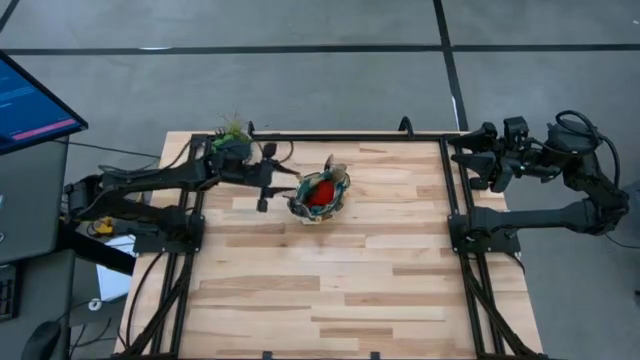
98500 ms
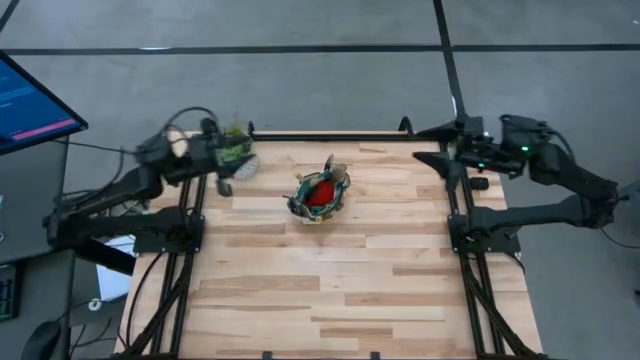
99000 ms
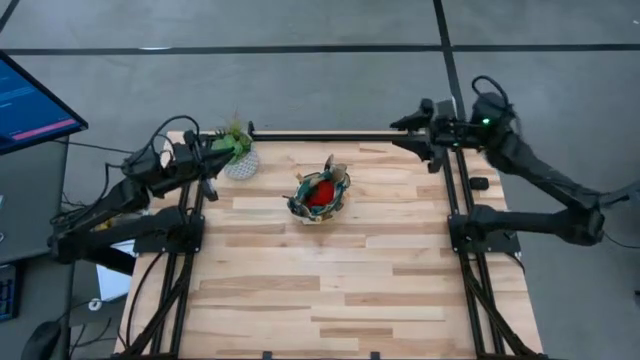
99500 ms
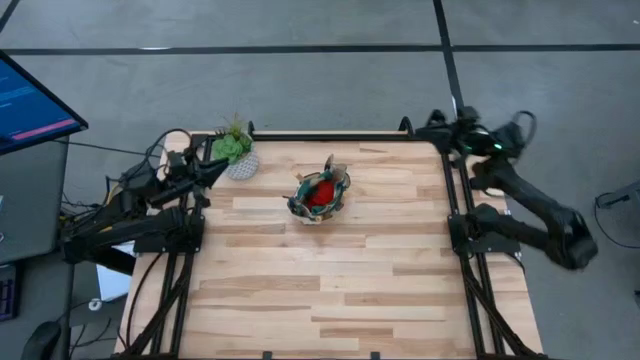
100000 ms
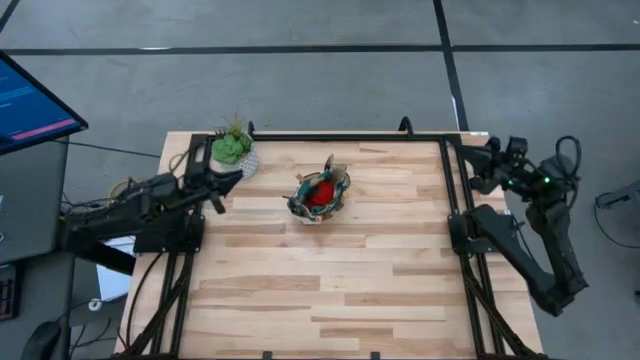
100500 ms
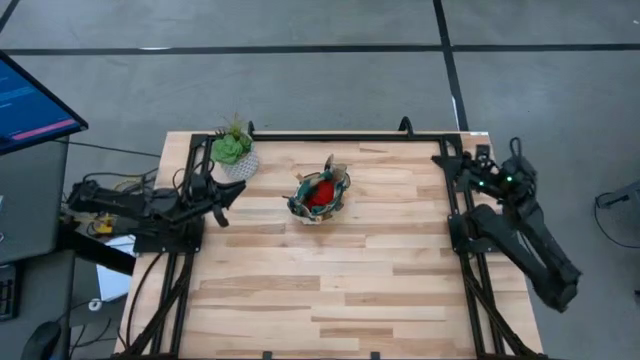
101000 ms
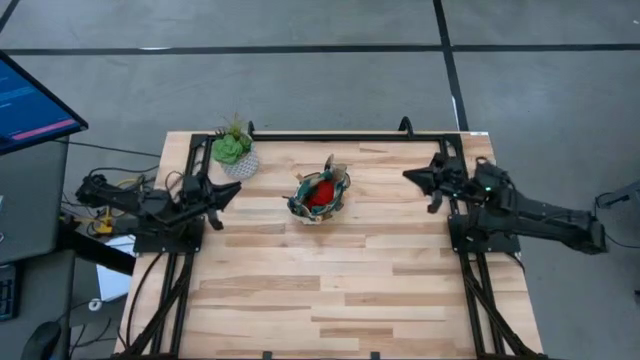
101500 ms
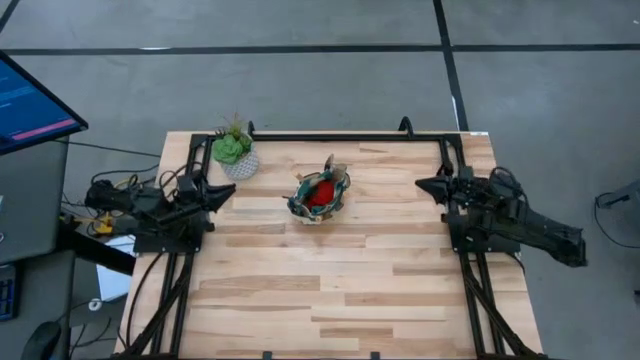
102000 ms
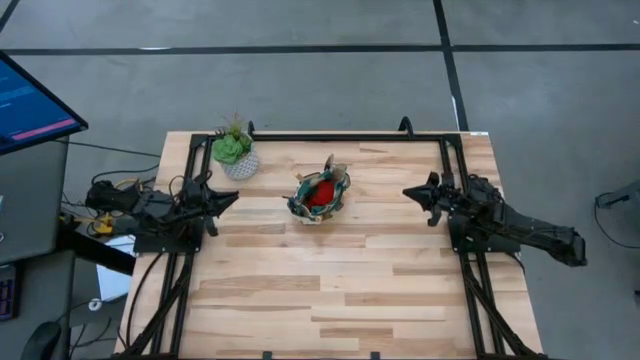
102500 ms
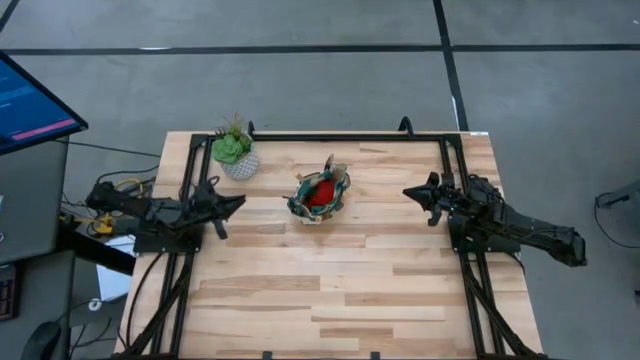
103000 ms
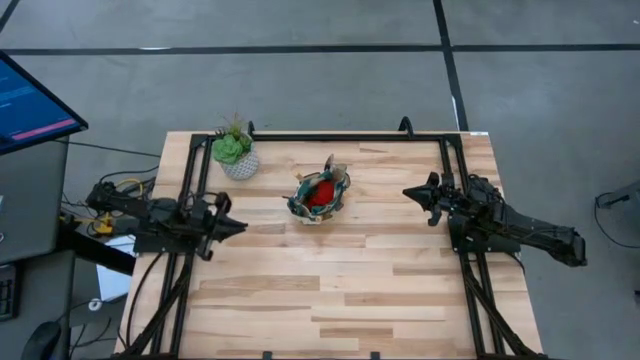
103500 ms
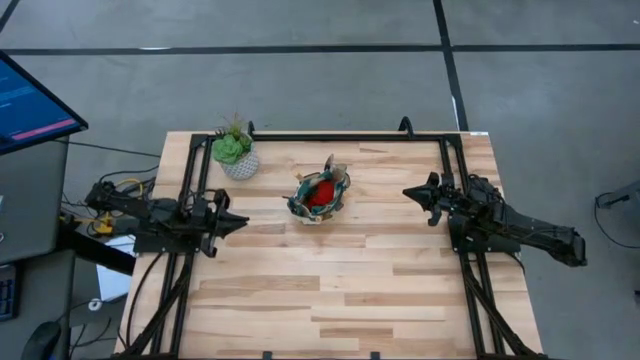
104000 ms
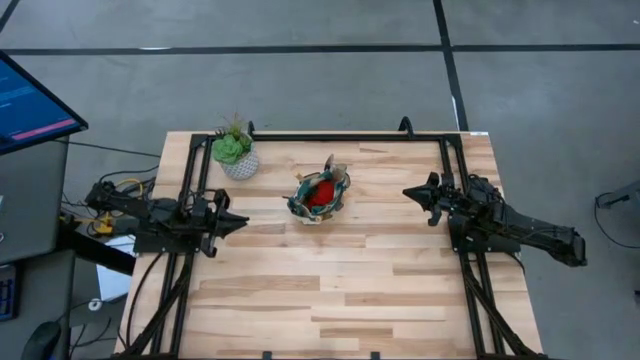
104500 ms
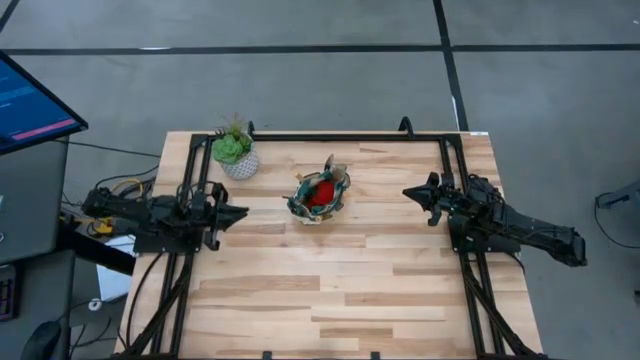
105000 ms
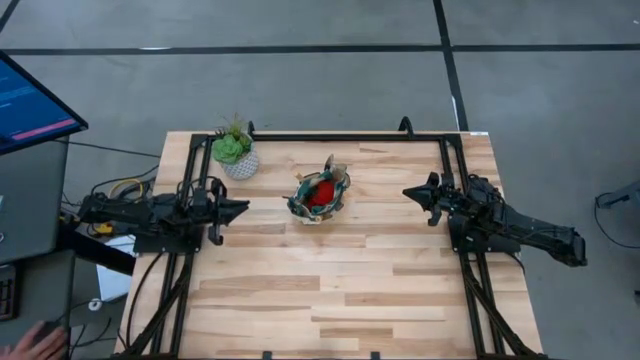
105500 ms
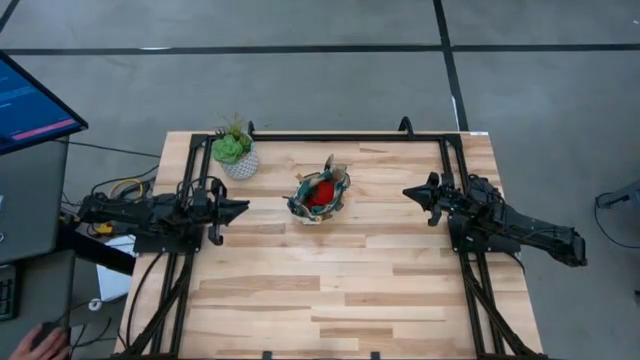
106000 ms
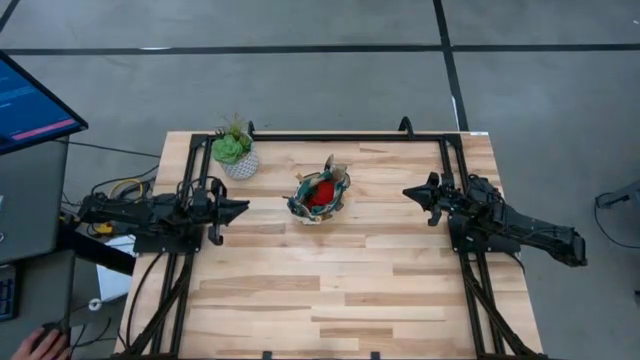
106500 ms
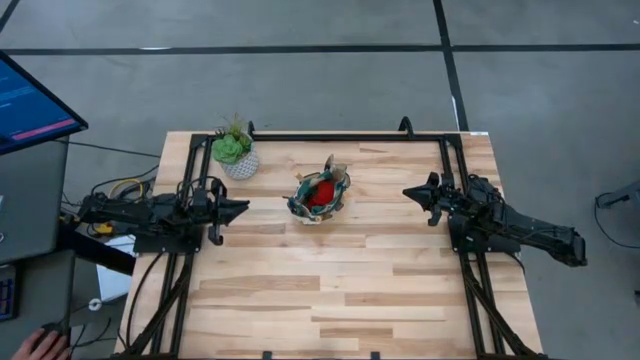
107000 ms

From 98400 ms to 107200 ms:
Task: Pick & Place Garden tools in Gardening bag
Return to Home Position

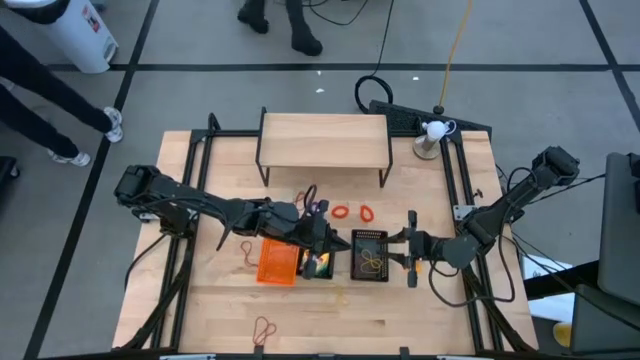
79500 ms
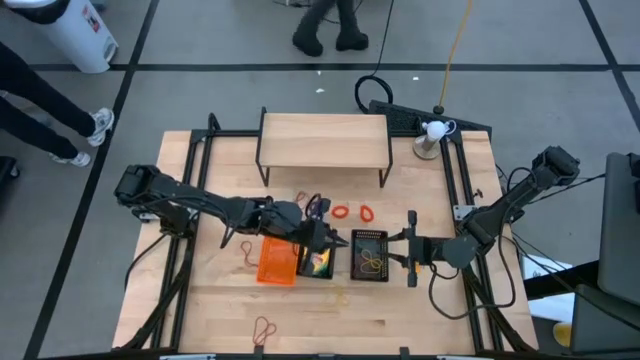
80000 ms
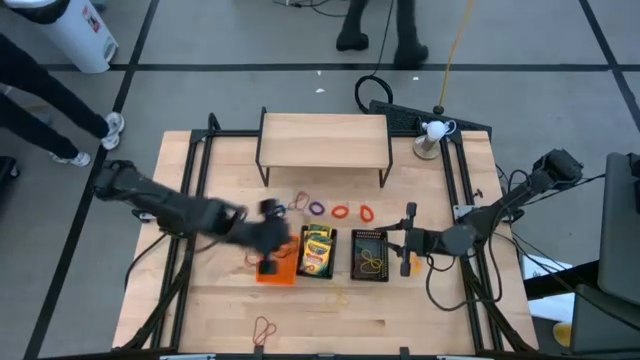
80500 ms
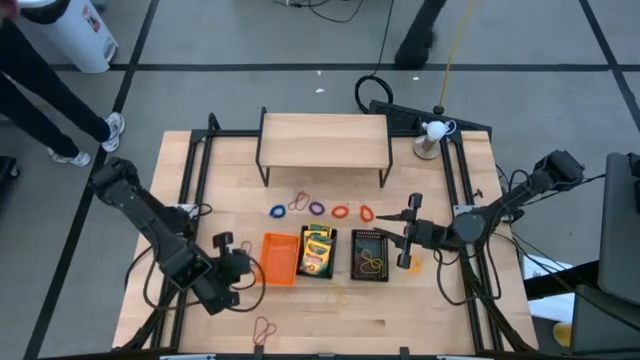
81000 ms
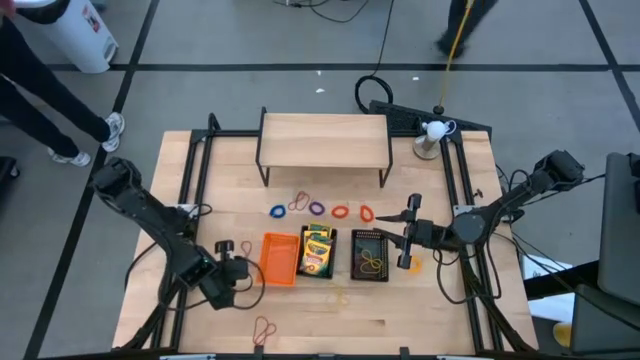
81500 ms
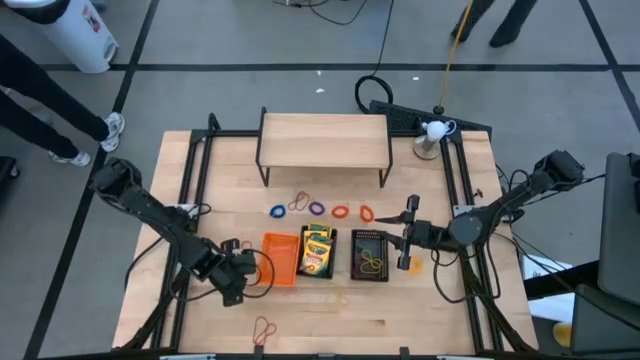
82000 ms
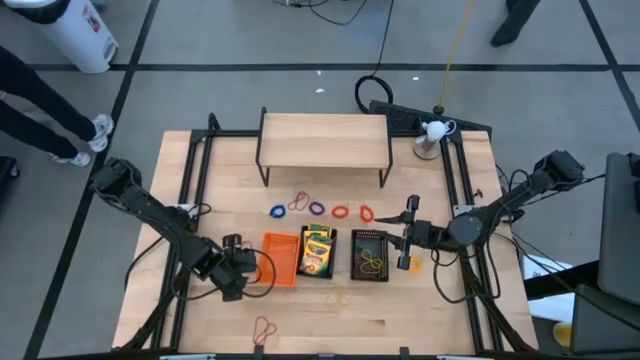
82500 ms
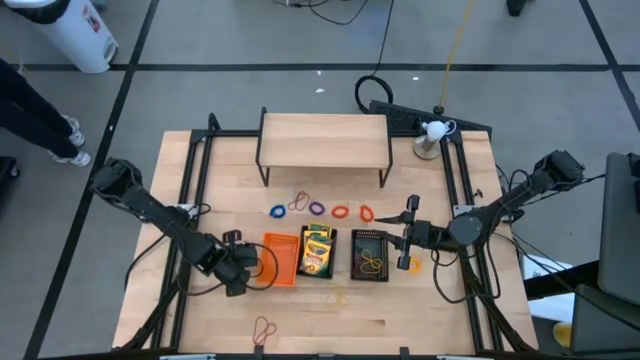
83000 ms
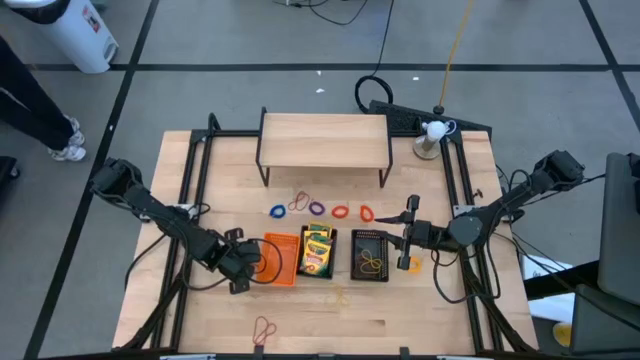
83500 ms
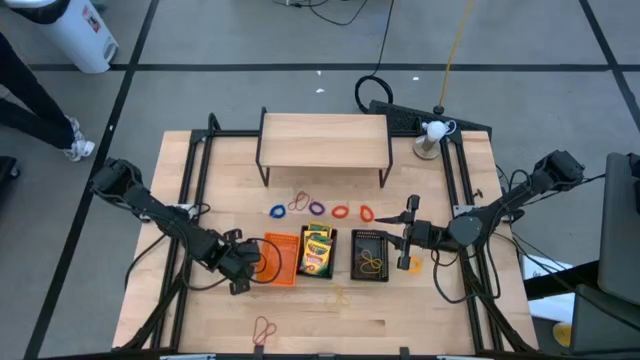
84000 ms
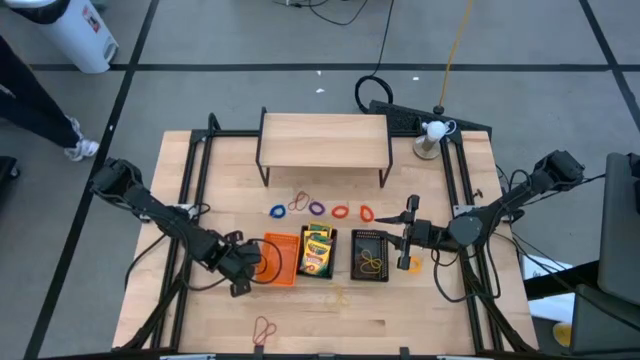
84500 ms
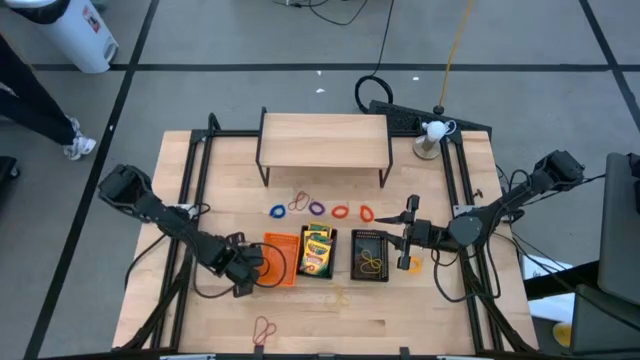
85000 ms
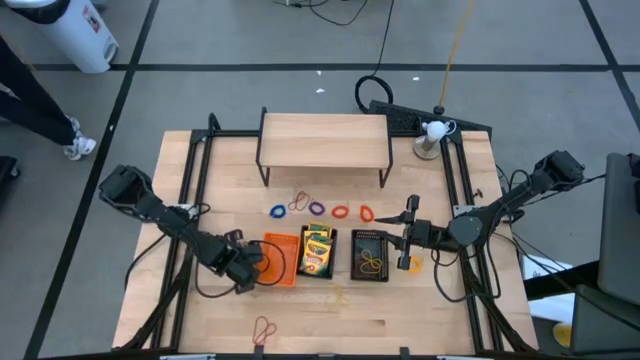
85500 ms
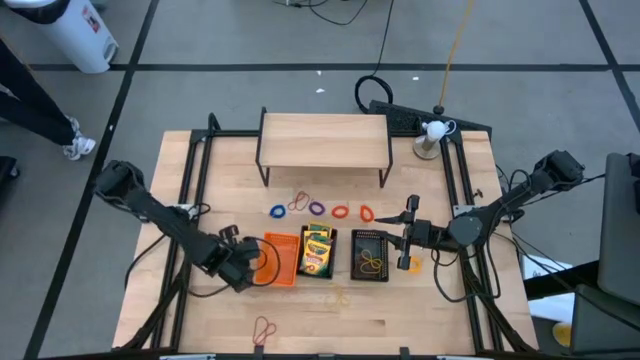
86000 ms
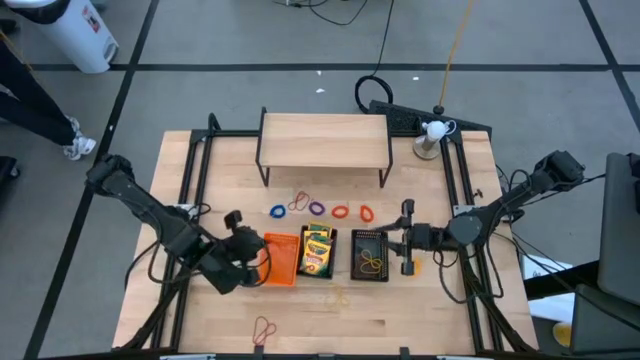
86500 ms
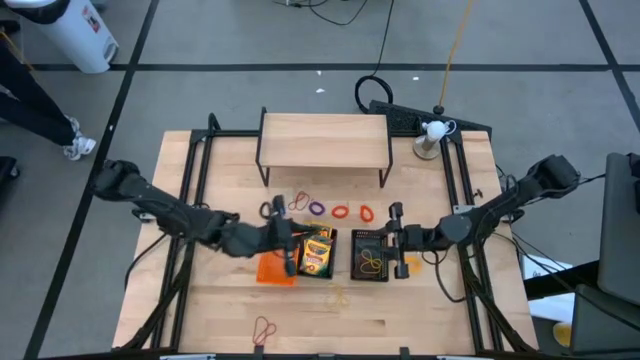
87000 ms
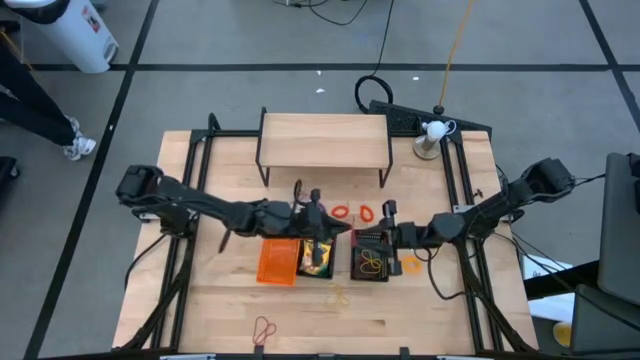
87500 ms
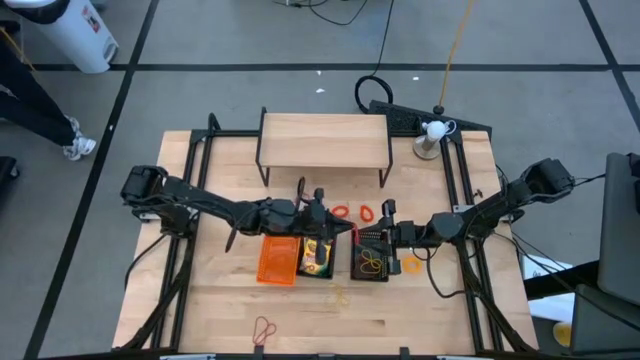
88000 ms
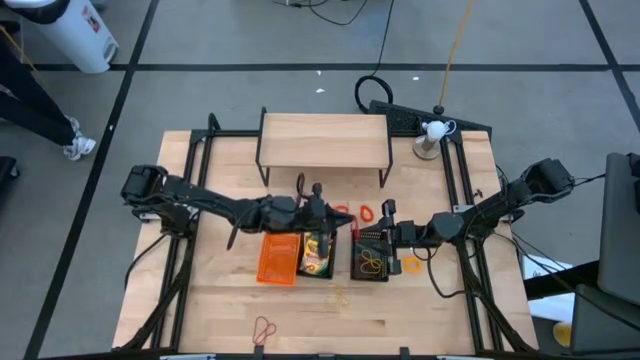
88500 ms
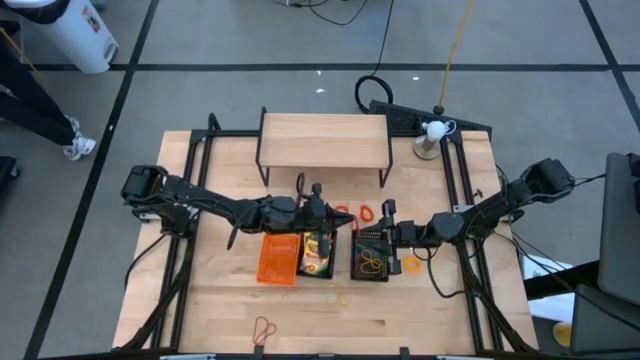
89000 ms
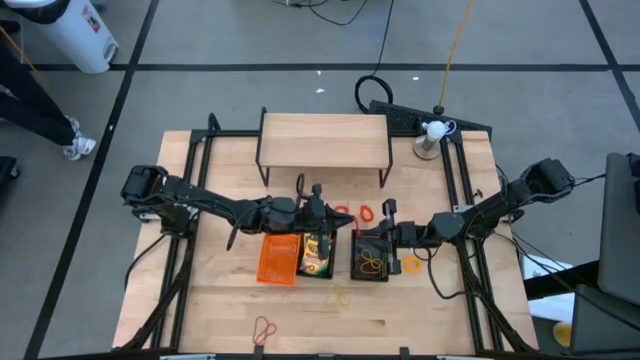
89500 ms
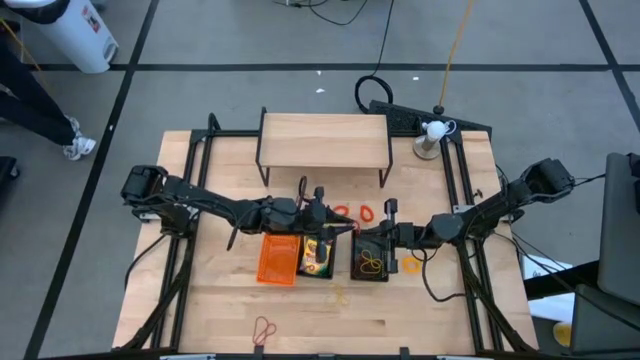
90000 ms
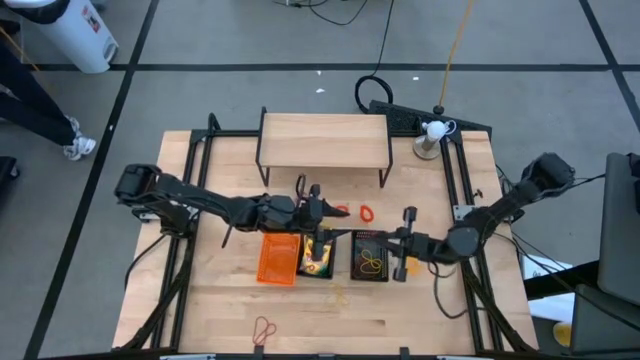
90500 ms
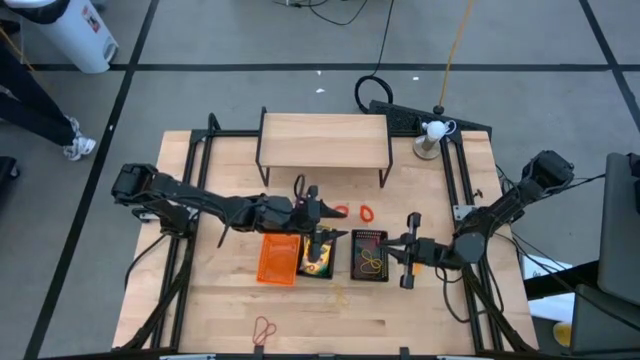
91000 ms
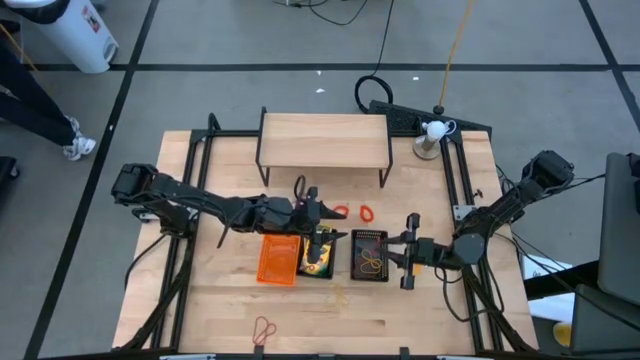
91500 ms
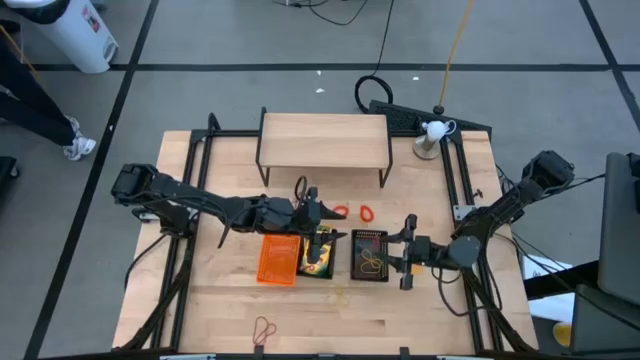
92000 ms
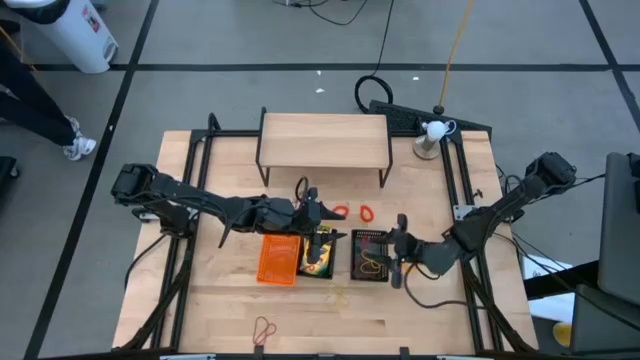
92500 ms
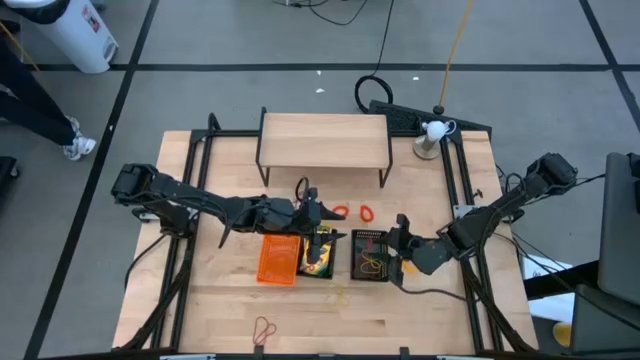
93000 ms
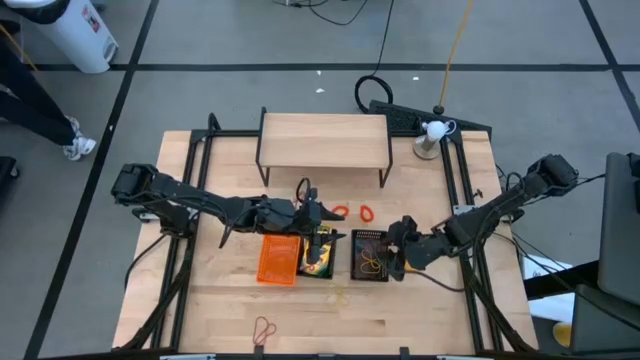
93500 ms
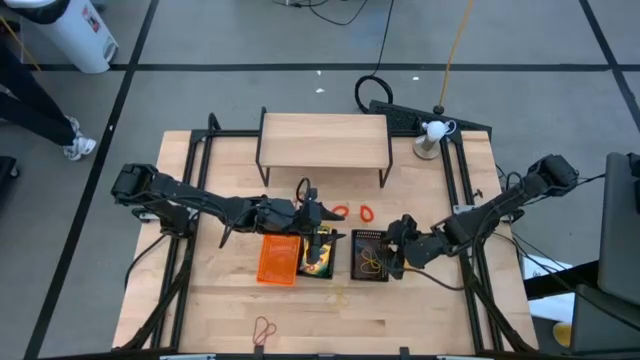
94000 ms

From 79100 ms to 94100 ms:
Task: Pick & Place Office Desk Supplies
Put the red rubber band into the right black bin
